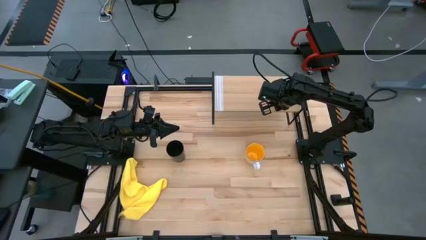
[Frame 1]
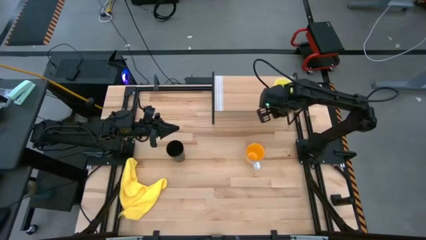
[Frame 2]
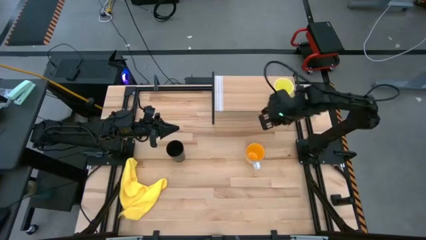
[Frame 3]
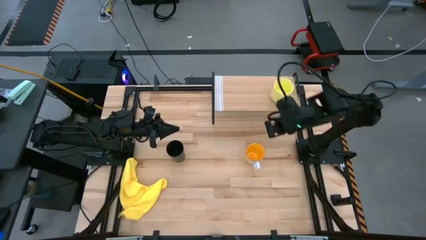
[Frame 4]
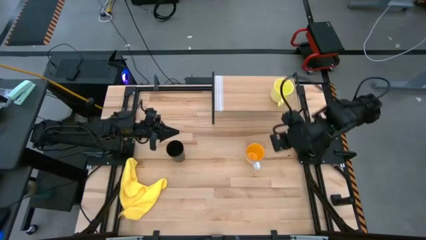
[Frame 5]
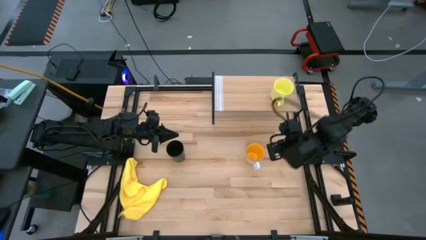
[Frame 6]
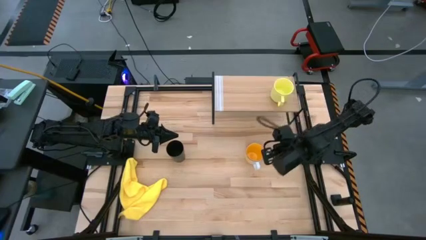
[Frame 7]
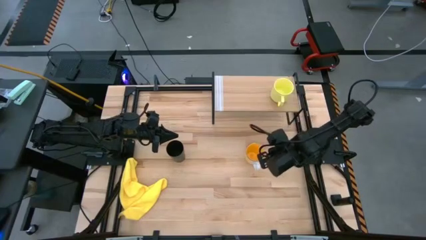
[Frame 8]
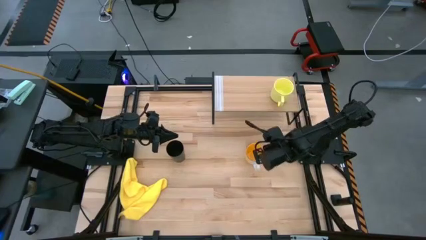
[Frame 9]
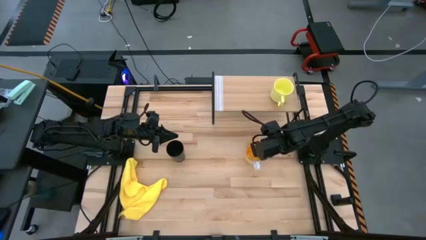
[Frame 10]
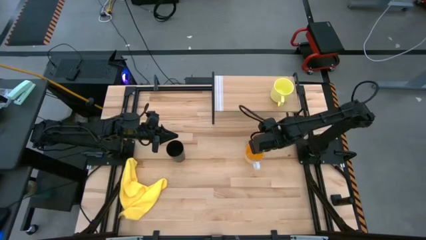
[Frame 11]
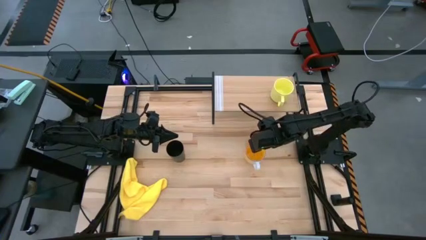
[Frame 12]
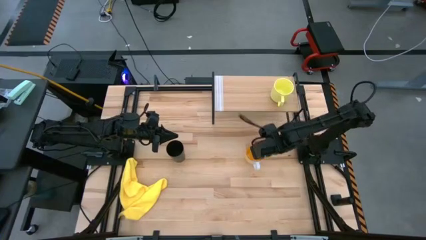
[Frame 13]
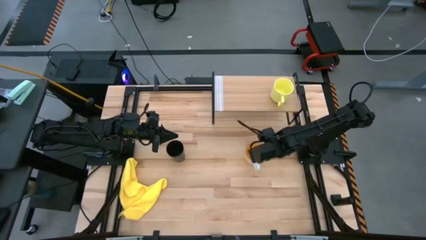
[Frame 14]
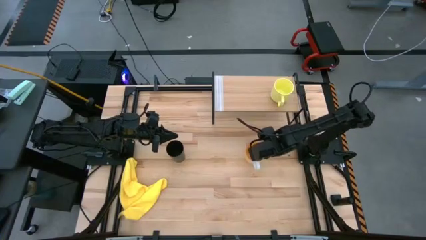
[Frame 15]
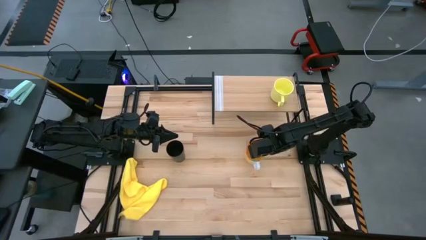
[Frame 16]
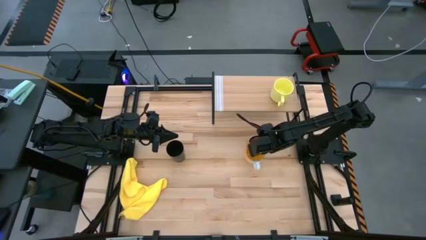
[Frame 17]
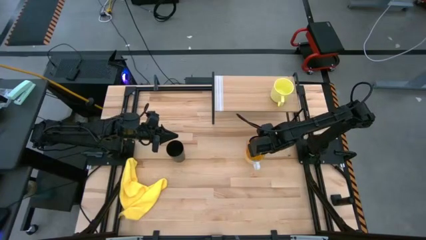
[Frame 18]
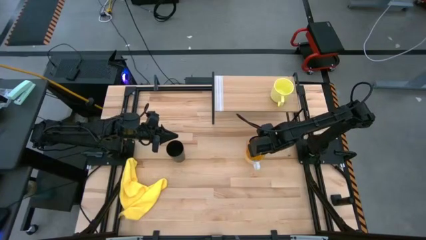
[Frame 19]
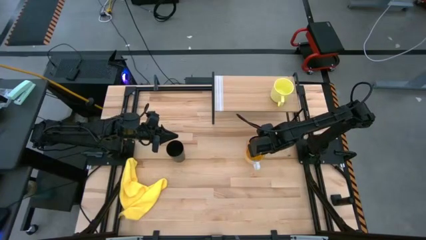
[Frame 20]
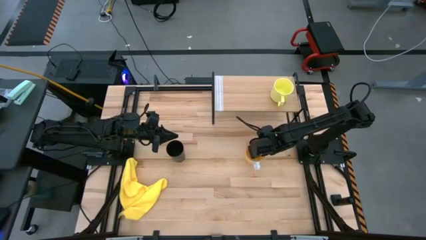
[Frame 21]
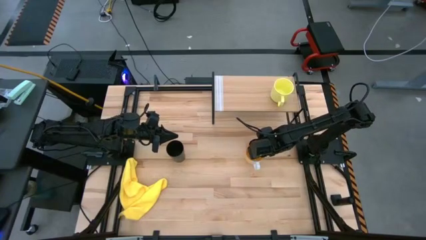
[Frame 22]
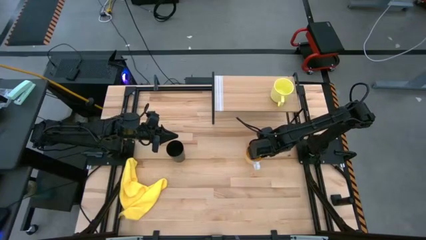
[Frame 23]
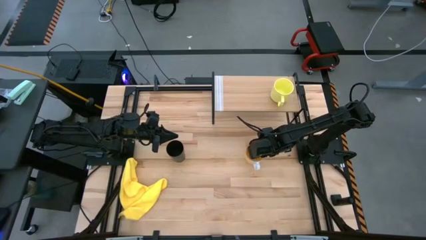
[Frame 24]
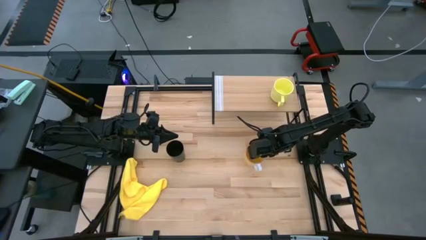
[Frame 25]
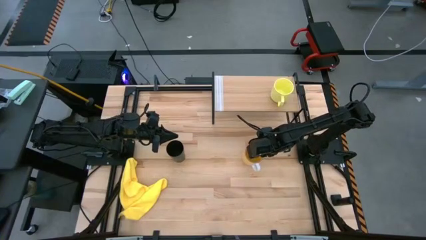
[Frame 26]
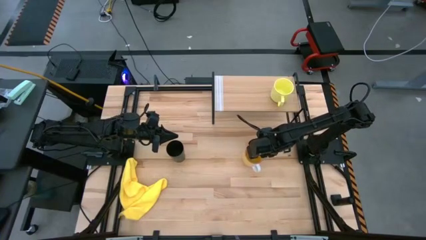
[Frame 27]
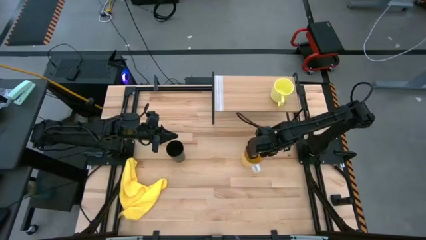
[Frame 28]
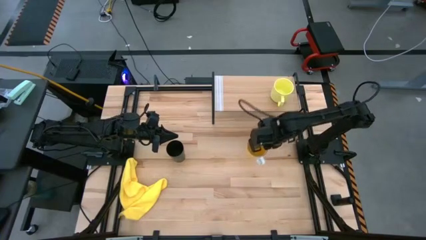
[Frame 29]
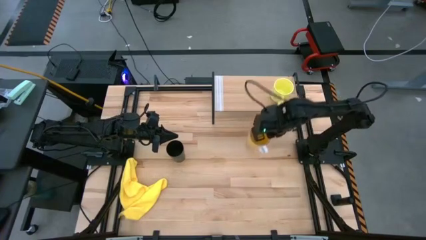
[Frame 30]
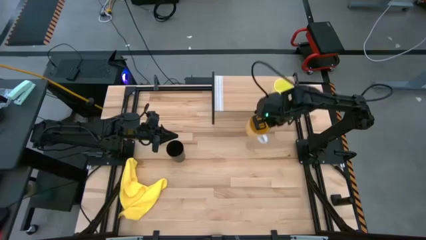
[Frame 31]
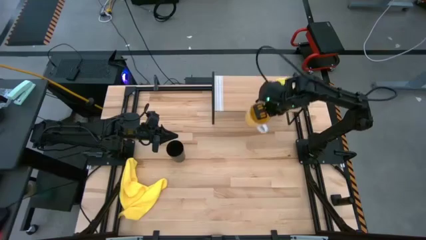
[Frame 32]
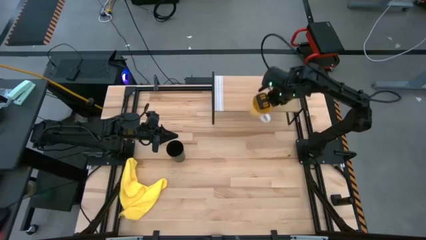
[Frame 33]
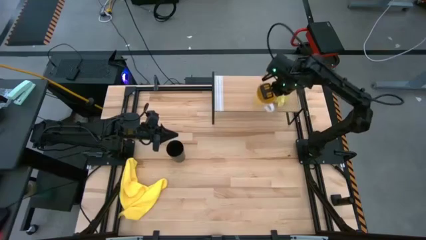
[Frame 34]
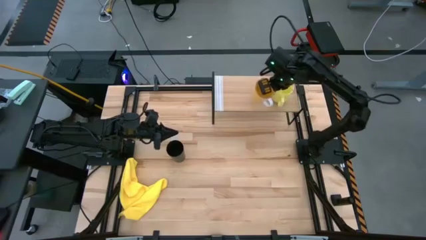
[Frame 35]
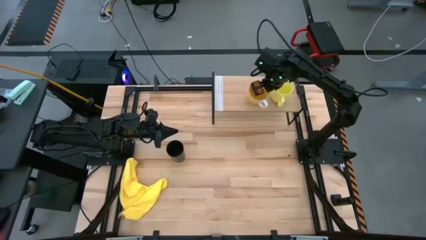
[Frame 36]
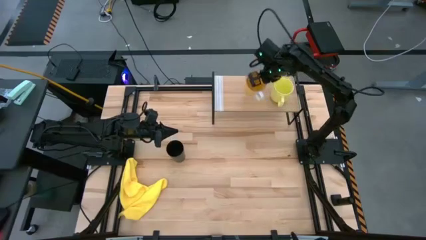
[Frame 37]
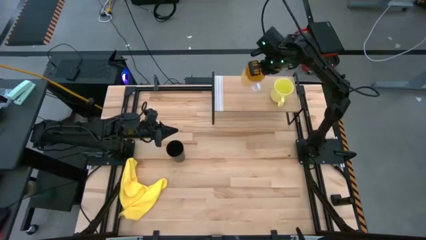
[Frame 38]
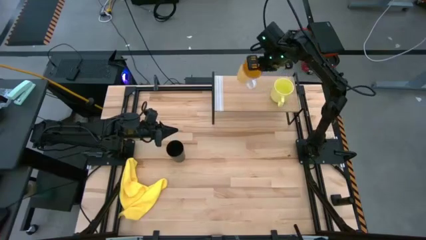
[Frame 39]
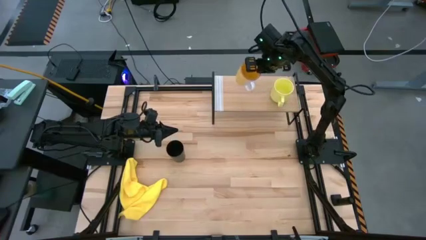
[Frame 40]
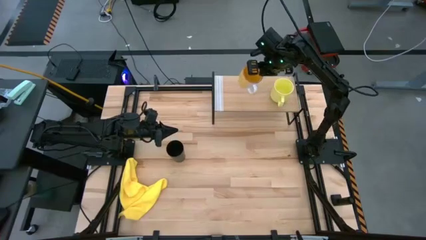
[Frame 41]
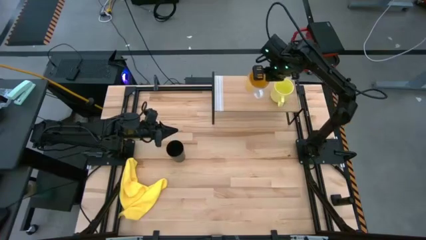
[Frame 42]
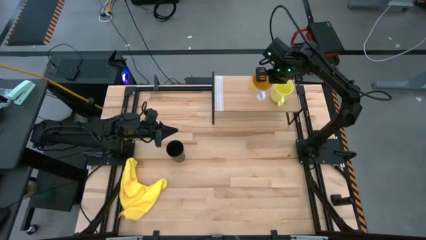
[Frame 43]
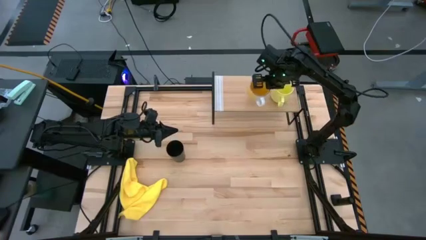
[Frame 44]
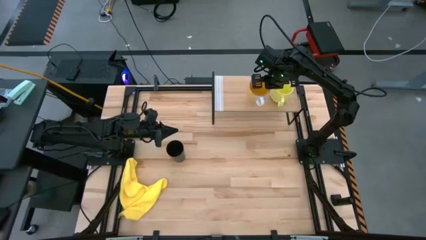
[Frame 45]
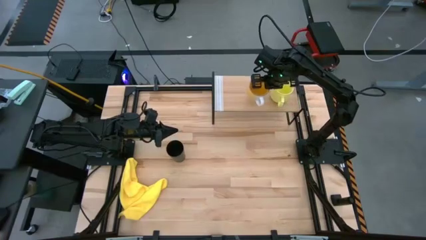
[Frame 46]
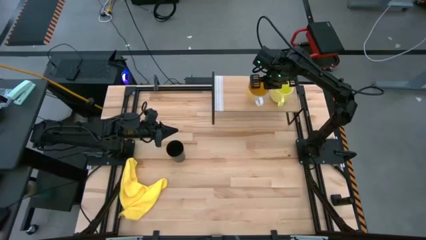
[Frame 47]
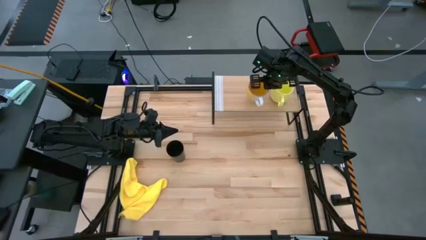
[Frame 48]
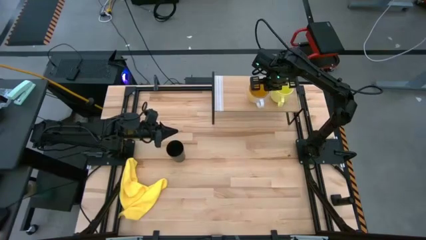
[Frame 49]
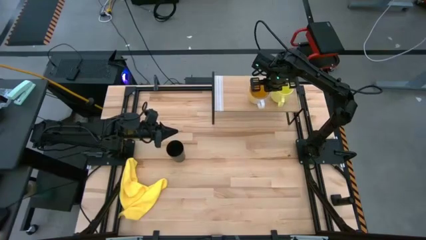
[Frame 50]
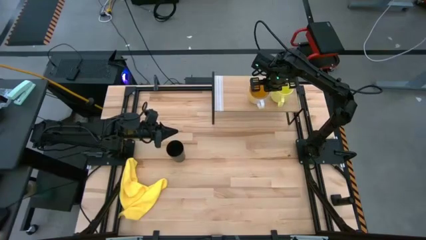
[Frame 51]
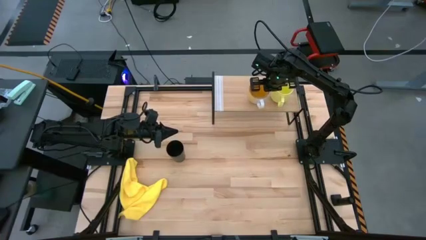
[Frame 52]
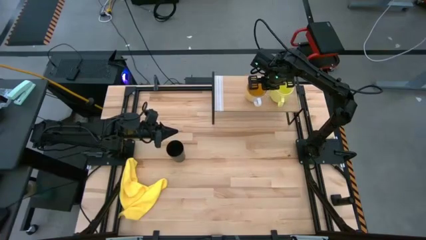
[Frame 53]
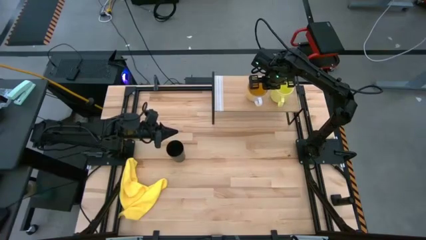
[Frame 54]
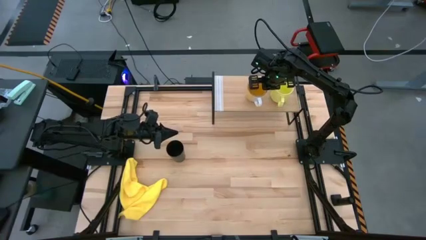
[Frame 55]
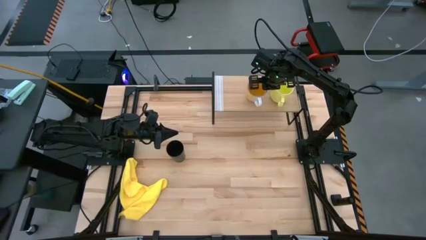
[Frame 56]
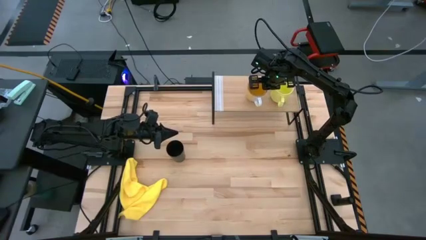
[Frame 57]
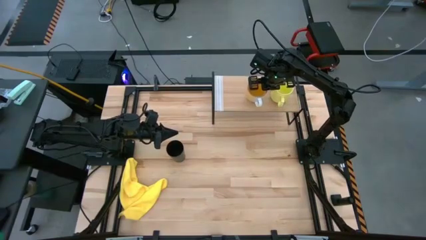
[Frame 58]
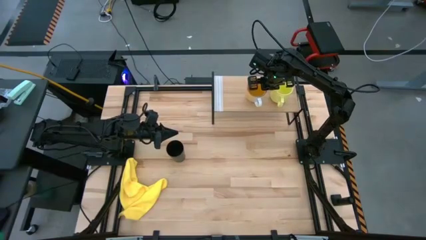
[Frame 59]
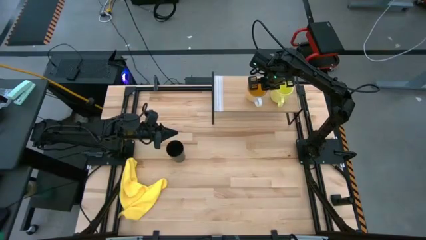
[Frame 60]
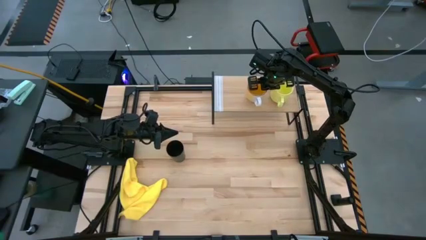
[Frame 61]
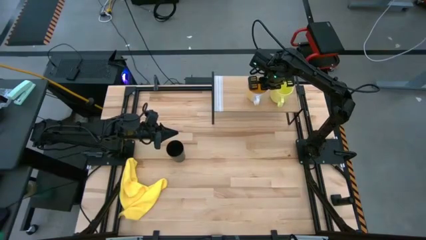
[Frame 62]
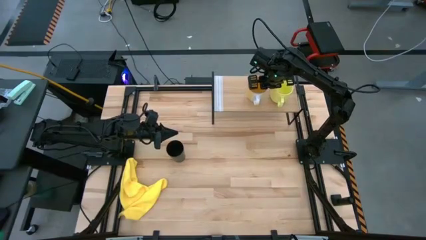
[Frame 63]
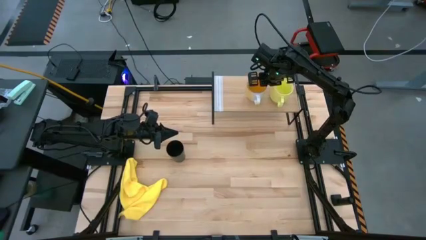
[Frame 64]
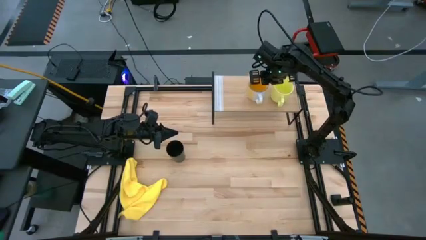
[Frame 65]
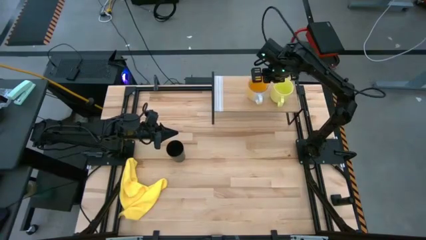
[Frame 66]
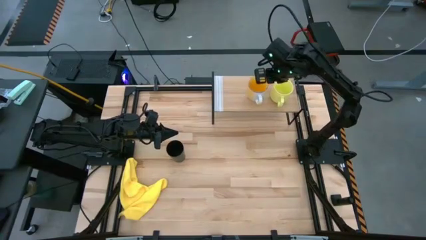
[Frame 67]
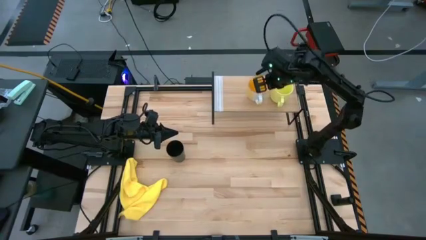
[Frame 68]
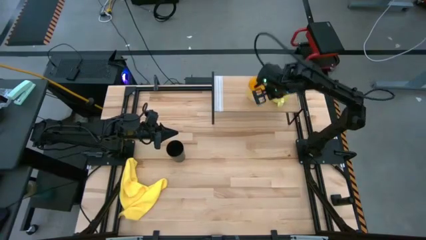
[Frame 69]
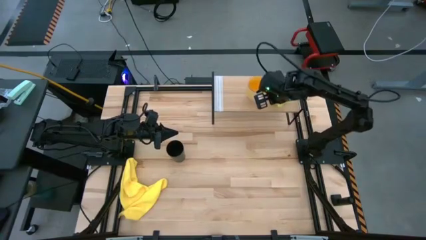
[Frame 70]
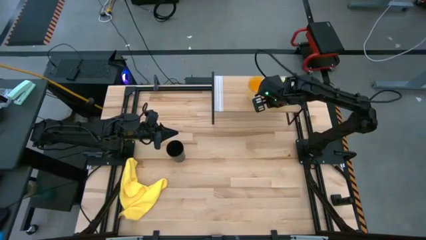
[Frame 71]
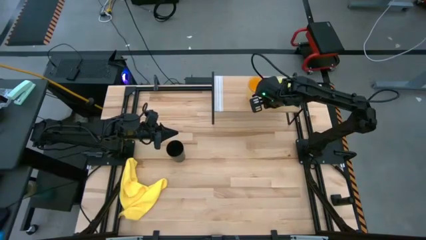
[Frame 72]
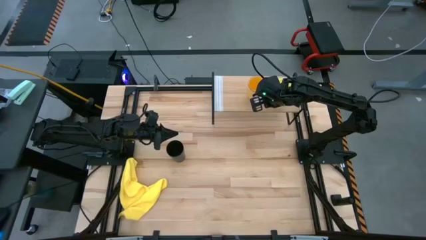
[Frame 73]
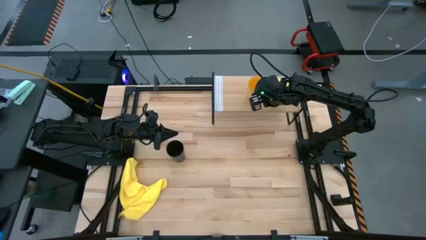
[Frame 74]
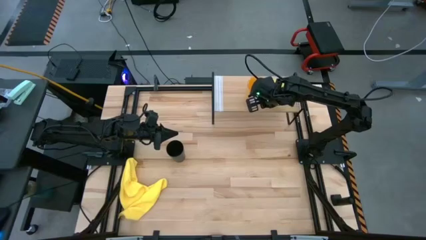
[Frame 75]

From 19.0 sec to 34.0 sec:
Task: Stack small to large cups/mugs on shelf
Put the orange mug on the shelf

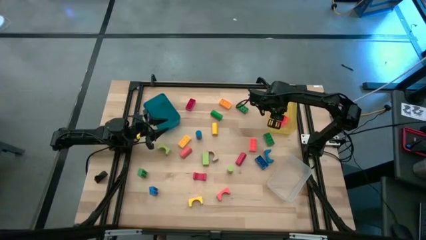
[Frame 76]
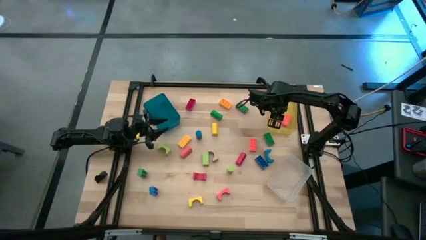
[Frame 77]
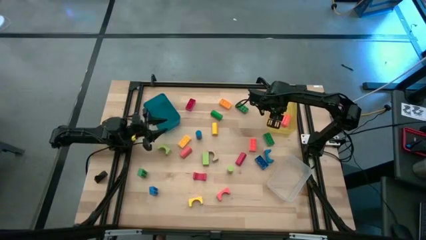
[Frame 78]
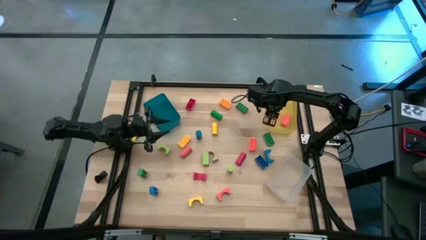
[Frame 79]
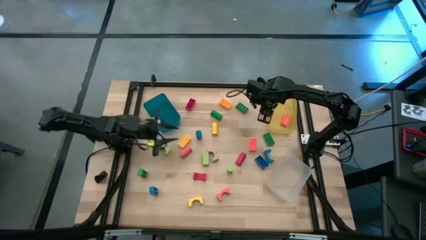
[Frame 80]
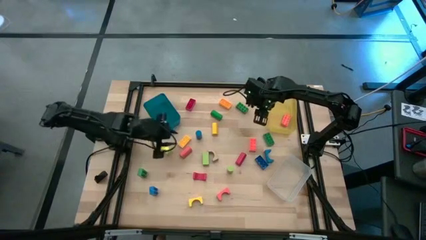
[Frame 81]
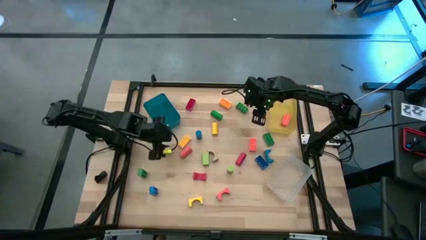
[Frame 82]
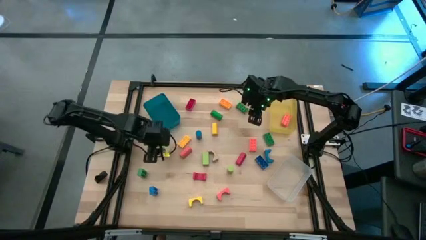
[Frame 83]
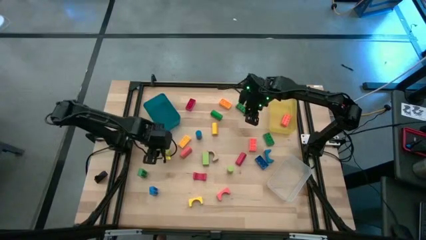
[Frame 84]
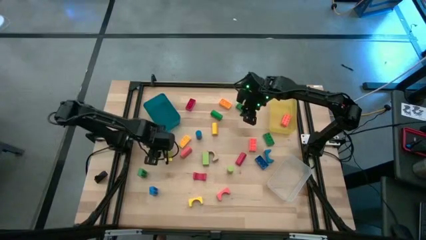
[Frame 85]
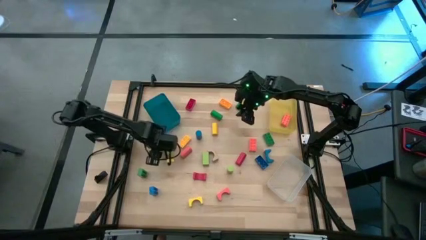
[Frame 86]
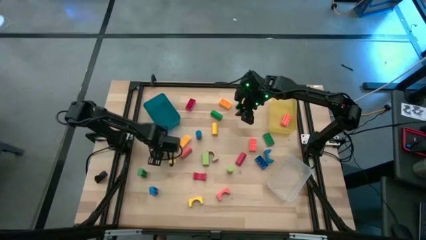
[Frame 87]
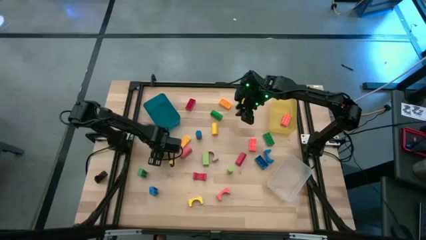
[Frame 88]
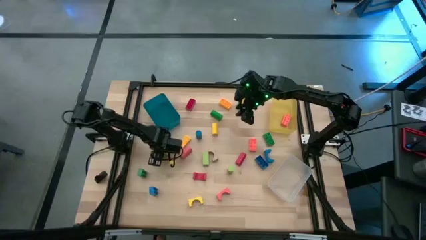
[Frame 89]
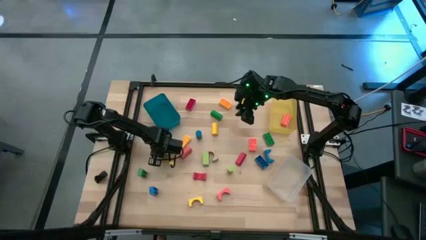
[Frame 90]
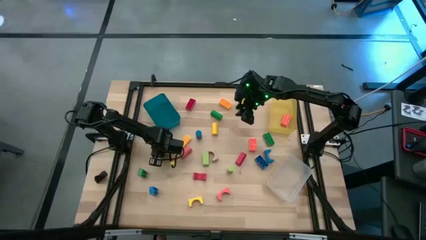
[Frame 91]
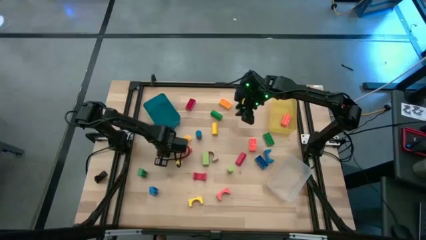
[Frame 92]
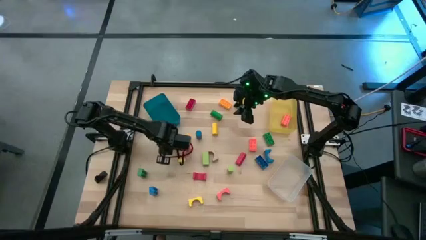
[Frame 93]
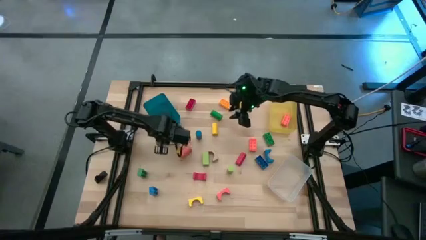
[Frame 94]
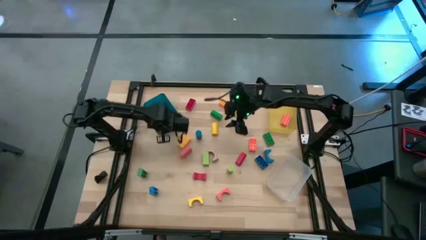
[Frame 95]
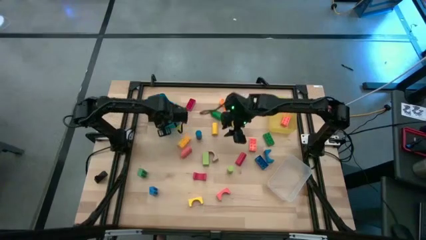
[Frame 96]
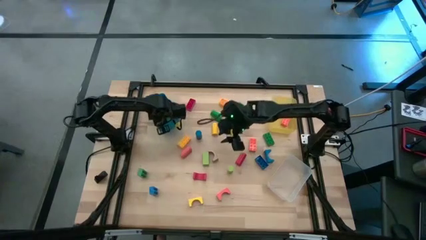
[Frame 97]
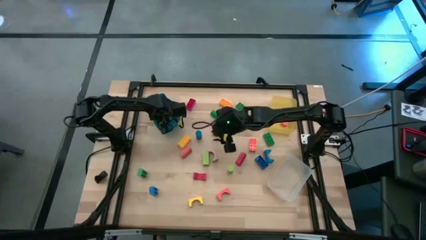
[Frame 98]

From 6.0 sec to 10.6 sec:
Task: Sort blocks by size
Put the light green arch block into the blue bin
